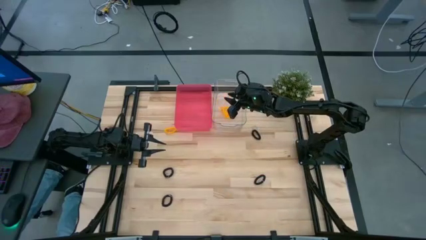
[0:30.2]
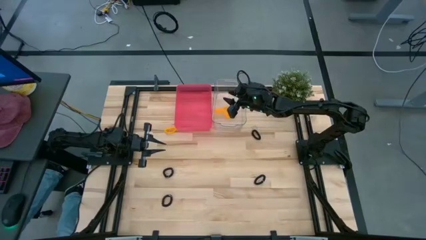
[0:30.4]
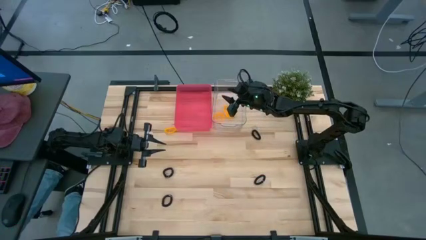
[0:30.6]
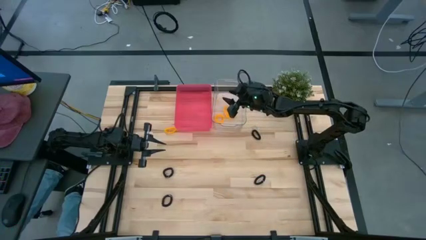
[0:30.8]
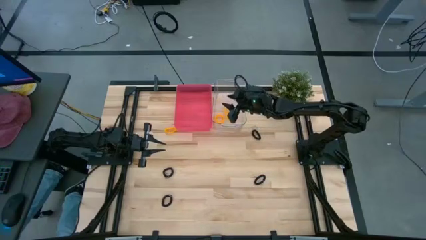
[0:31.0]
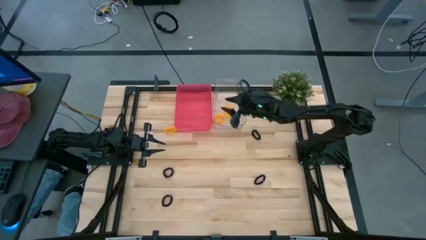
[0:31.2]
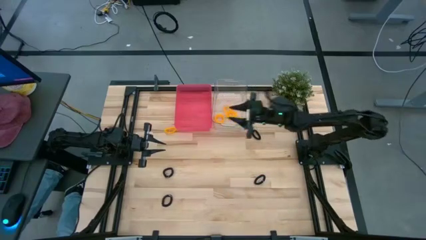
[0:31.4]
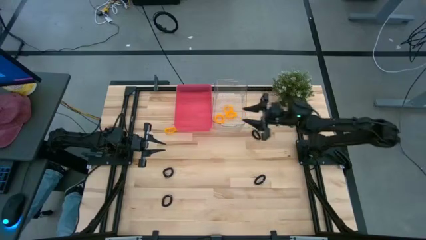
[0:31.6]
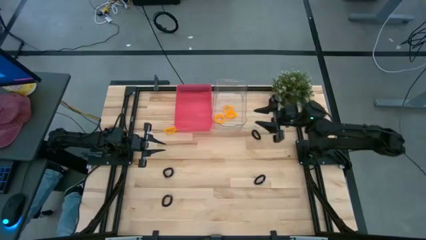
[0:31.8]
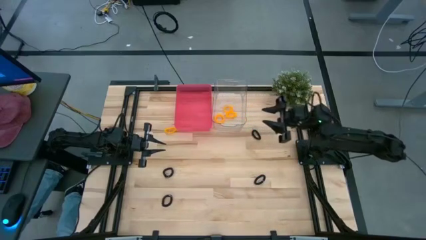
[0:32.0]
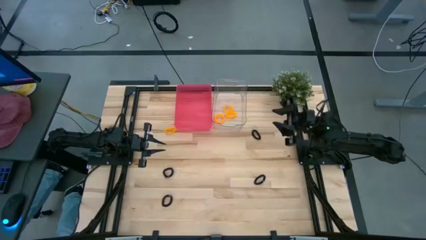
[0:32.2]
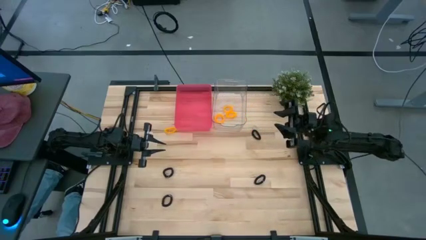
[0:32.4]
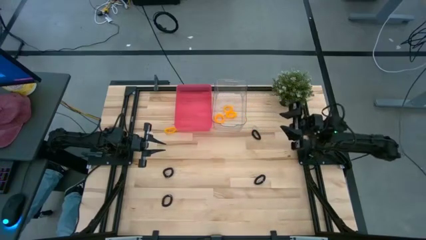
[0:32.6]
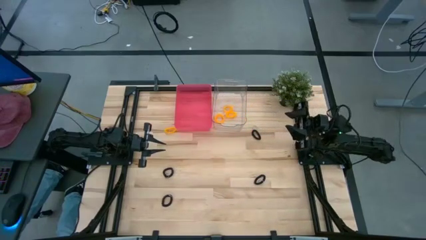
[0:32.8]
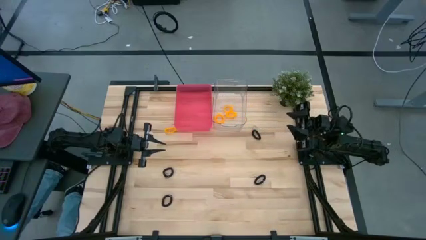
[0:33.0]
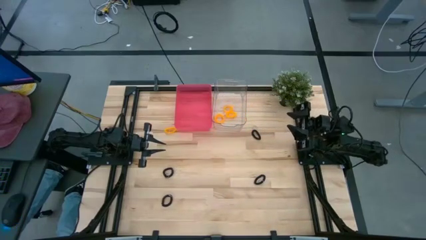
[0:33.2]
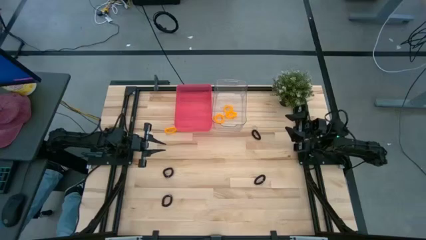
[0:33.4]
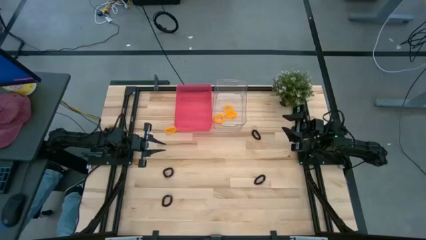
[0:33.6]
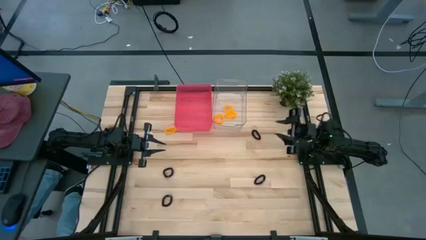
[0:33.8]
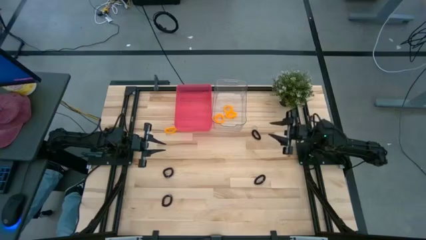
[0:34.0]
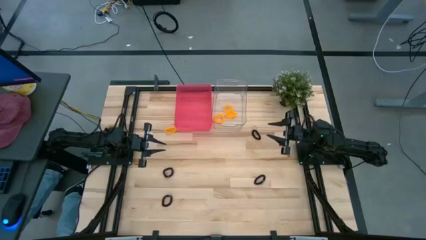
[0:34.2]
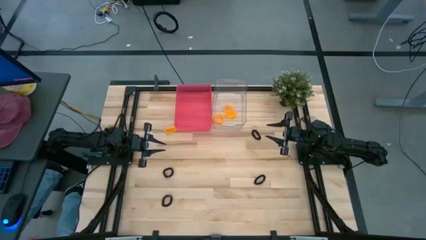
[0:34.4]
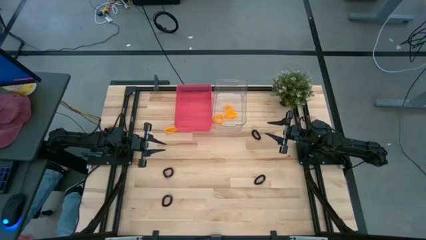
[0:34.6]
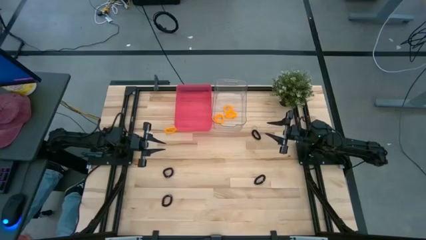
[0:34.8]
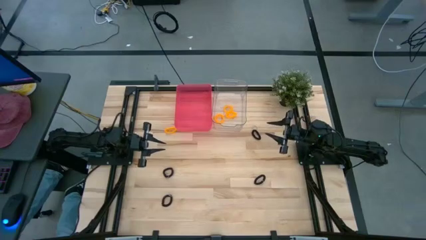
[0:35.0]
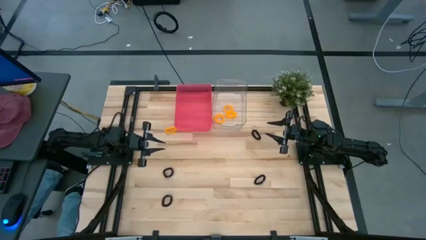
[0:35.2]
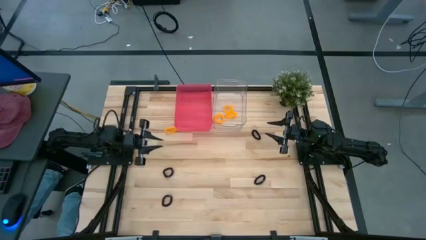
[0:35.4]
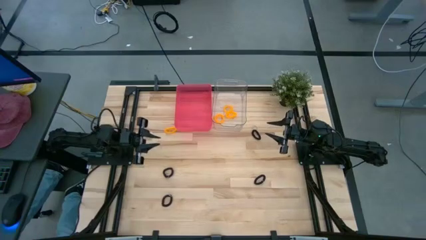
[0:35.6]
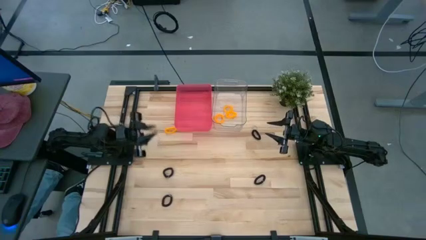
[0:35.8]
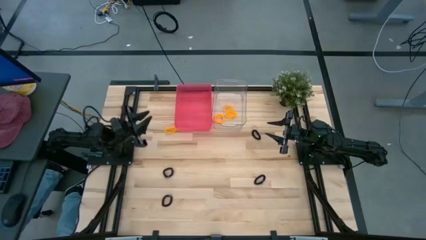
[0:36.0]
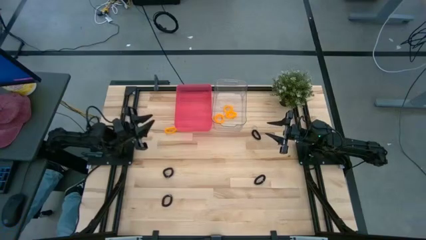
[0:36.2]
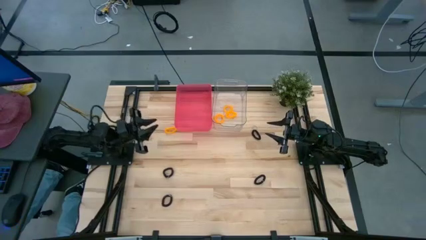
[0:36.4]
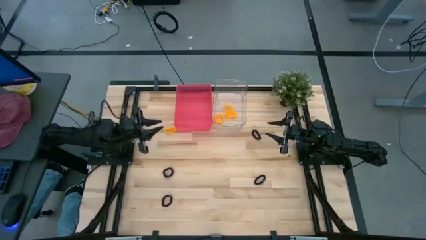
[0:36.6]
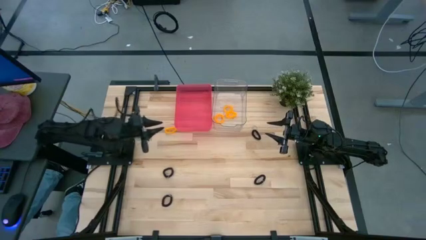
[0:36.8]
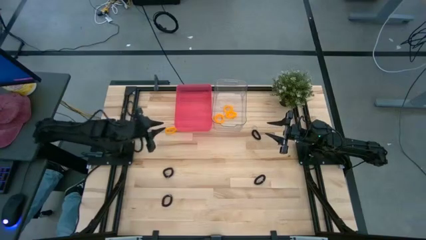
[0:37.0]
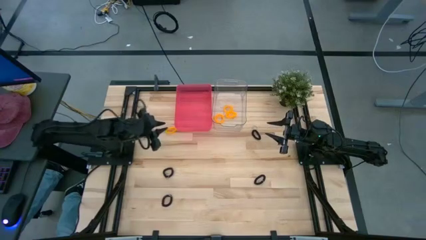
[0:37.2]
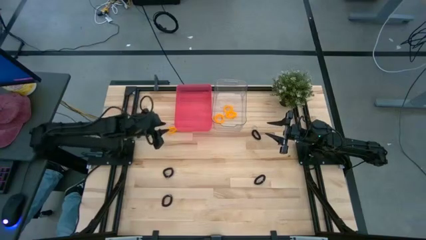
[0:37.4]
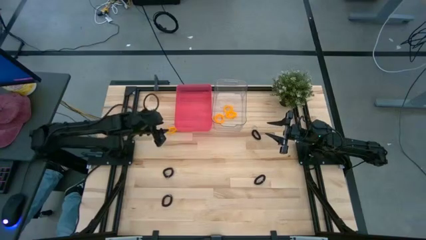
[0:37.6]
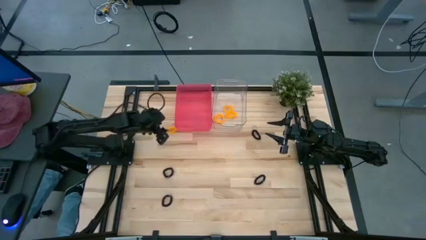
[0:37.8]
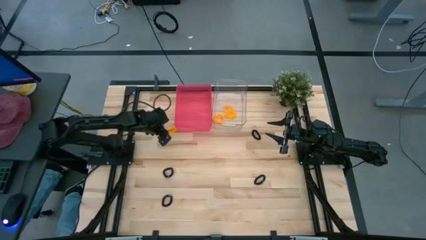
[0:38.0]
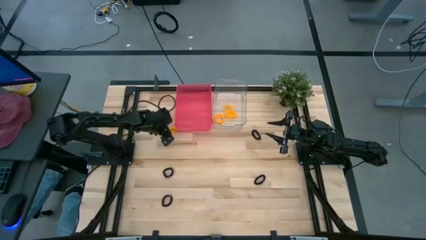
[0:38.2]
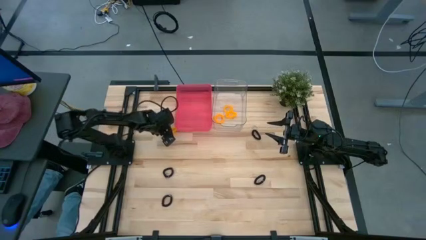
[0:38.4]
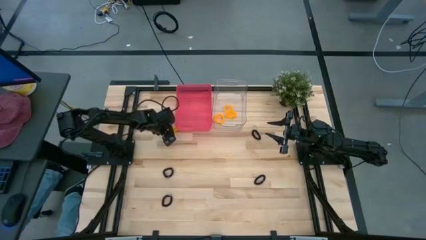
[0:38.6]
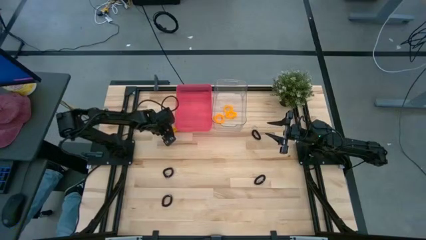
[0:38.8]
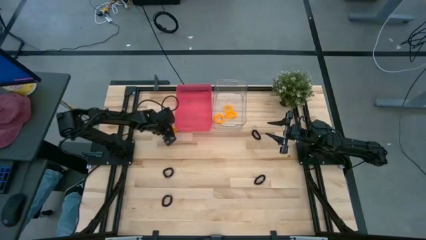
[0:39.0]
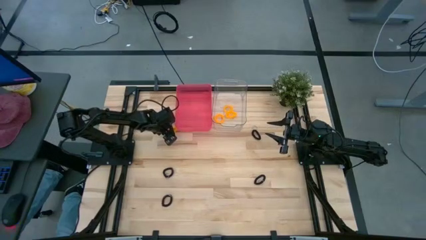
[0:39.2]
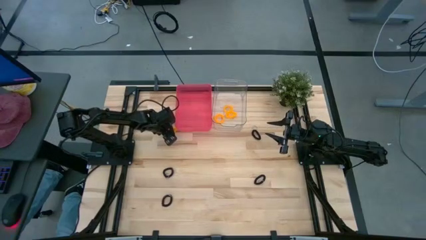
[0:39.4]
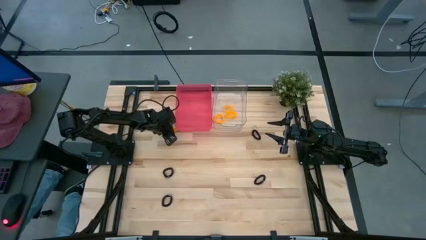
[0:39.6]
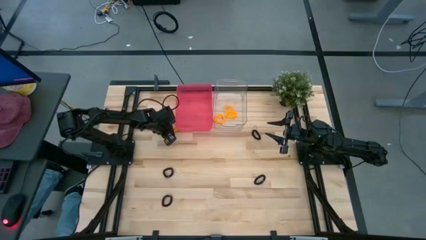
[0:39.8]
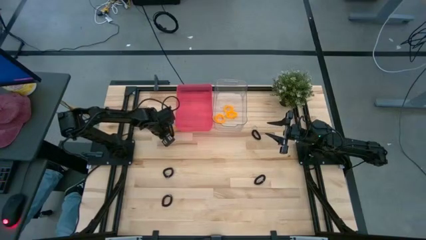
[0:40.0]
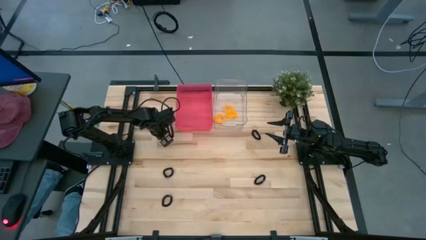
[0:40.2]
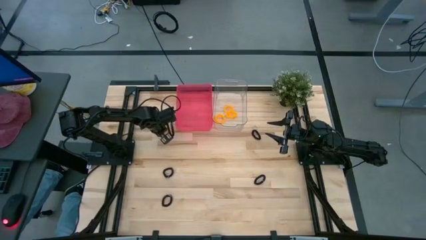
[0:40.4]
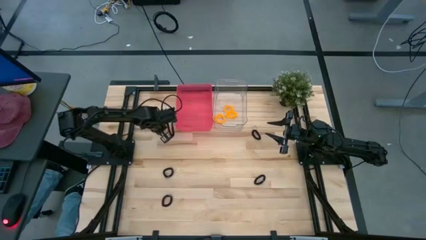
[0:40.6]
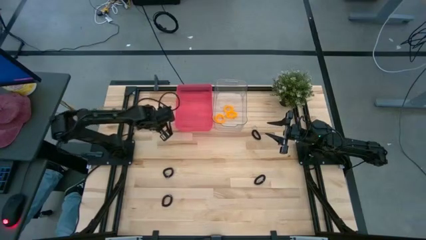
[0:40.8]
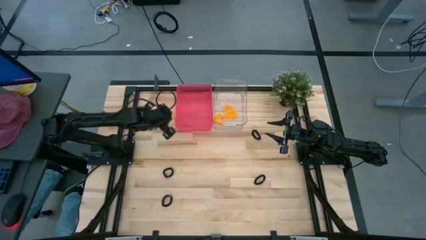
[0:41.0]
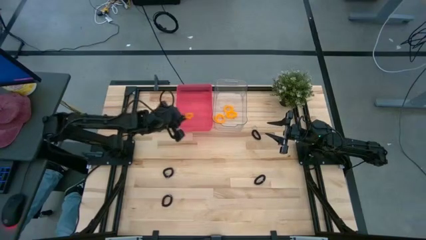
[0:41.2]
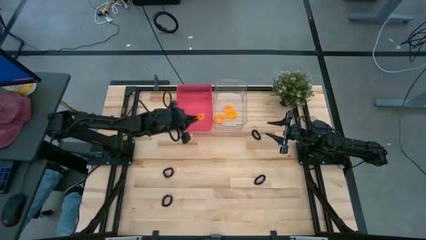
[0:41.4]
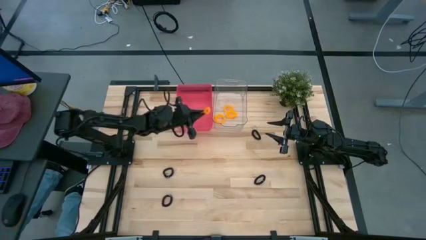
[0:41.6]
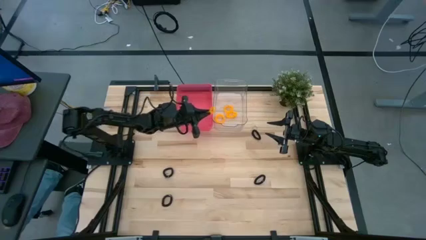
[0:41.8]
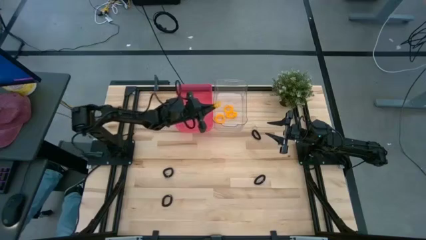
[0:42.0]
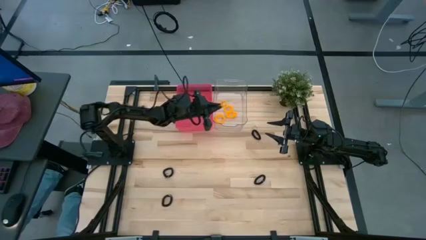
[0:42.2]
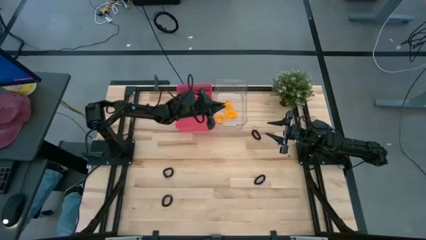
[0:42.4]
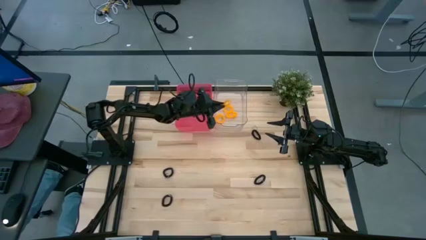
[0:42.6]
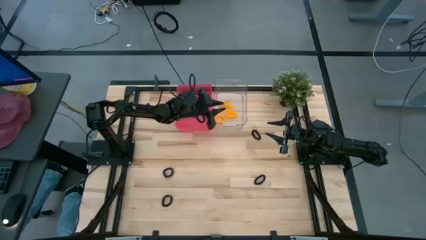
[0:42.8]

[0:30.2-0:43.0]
Task: Sort spring keychains
Put the yellow spring keychain into the transparent bin

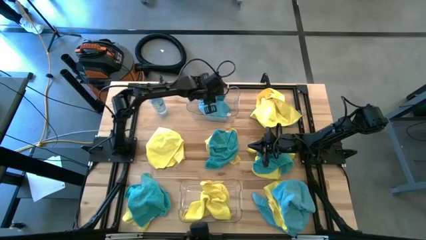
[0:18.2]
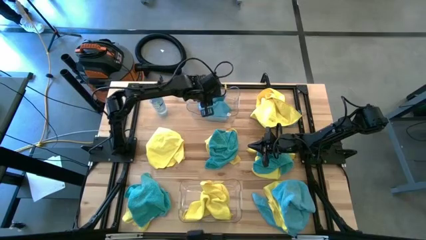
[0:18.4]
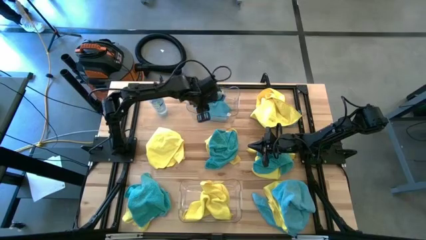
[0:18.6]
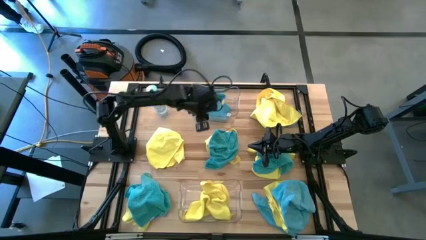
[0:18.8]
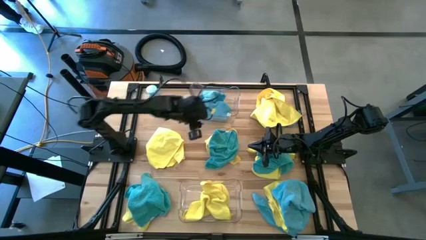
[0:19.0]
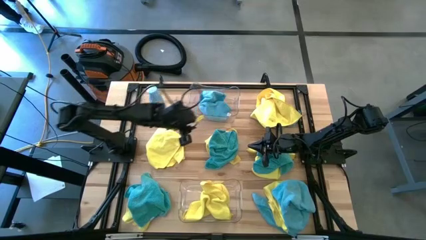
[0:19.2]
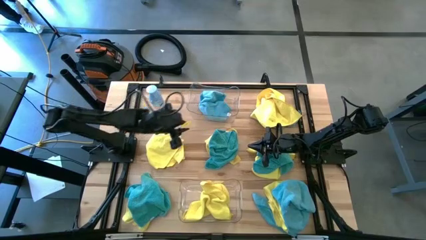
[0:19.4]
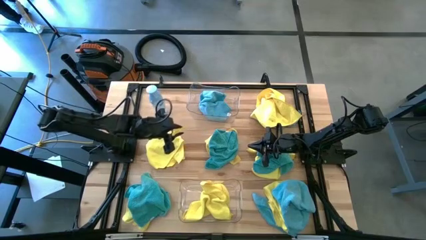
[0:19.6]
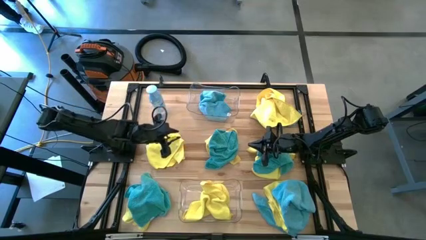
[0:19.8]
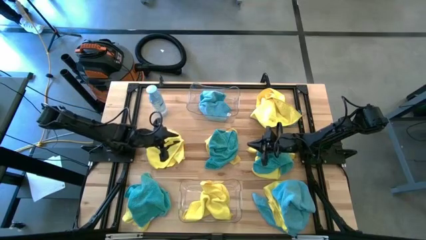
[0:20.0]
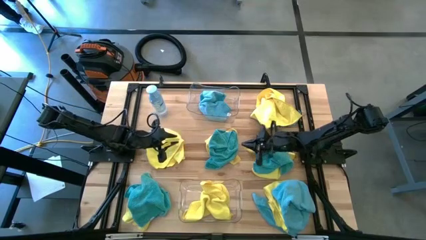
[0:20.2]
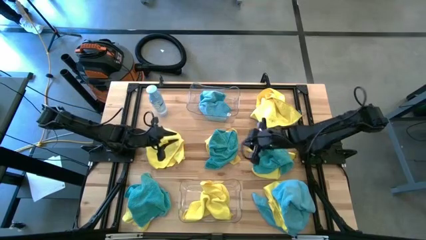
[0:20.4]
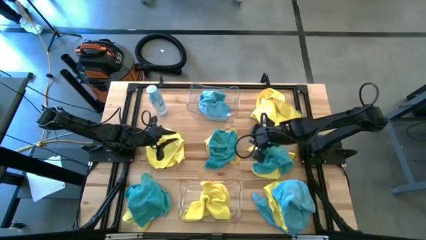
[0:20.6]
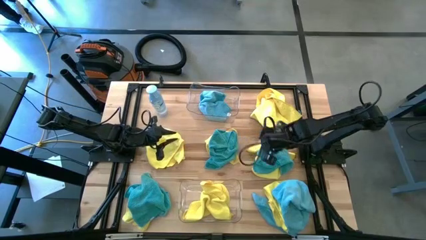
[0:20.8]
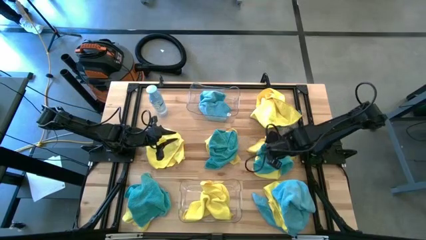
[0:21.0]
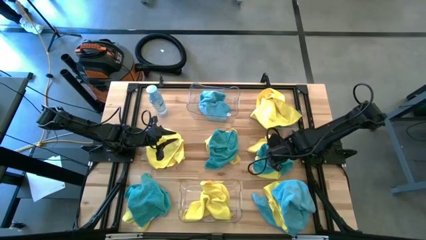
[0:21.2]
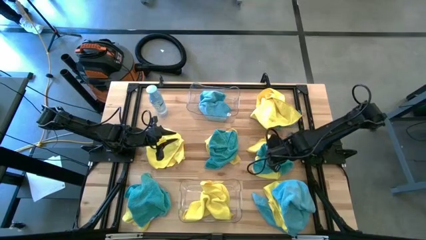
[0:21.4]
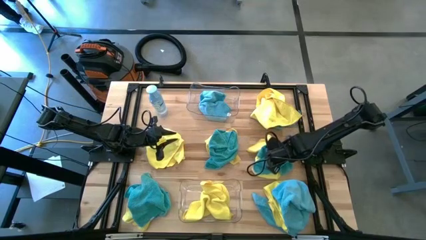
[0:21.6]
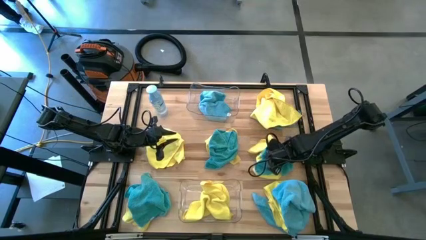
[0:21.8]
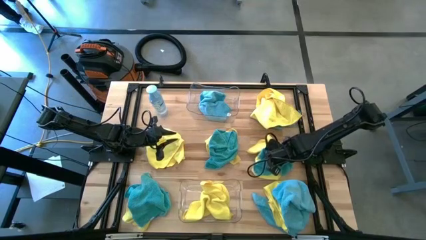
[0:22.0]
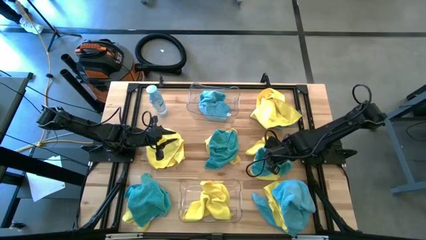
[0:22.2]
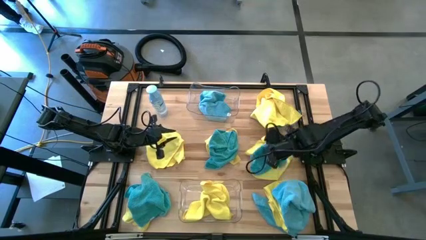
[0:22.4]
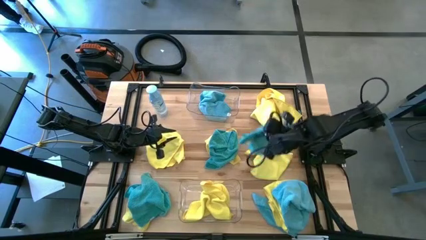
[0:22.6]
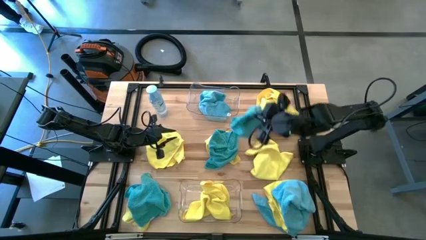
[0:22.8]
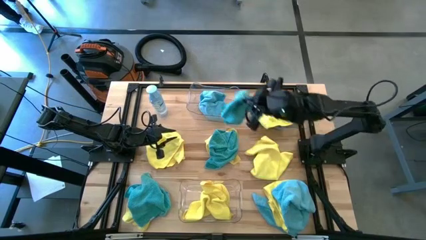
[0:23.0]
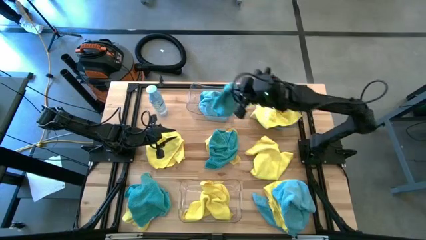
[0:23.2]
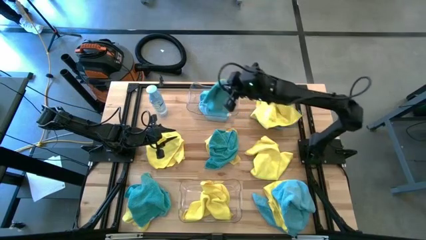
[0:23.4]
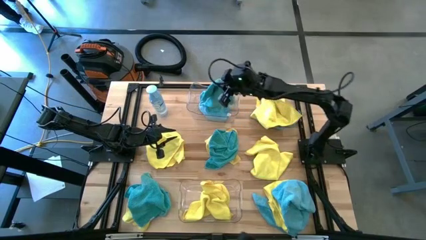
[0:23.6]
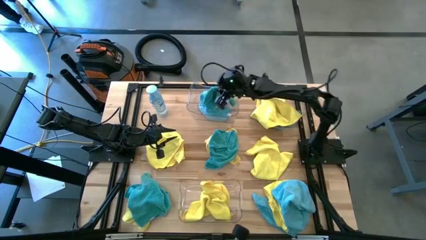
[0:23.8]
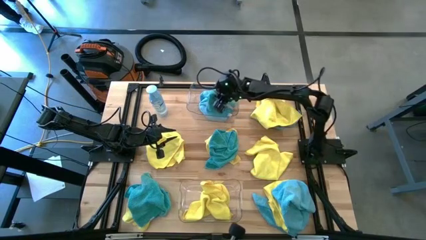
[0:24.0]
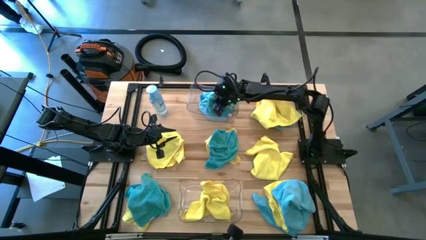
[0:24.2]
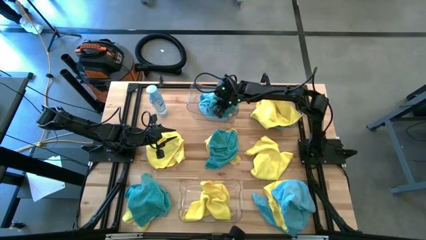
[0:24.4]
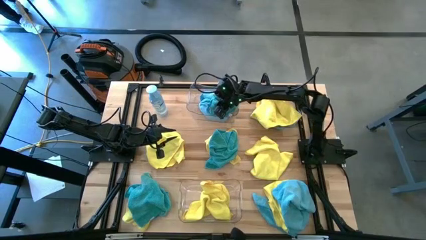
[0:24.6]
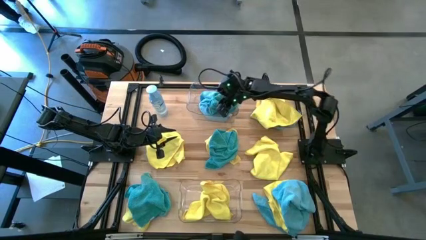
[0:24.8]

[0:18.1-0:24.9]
Task: Sort microfiber towel by color & place in baskets
Put the blue towel into the top transparent bin
